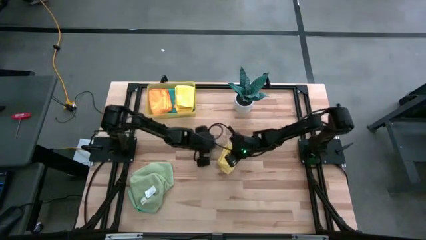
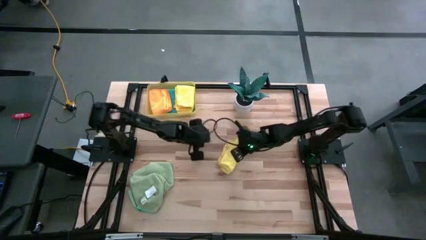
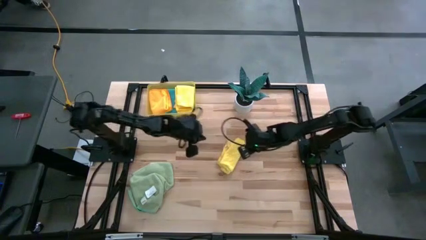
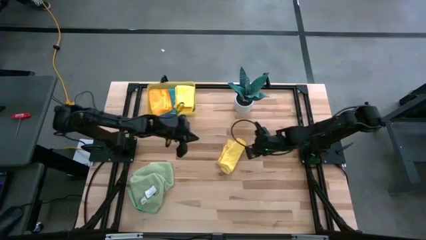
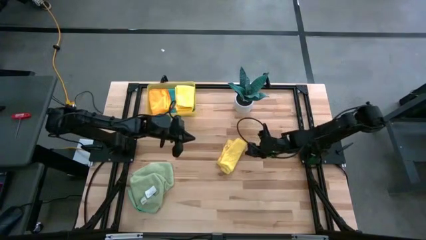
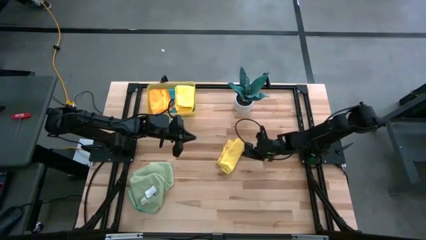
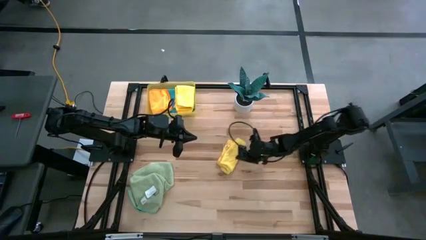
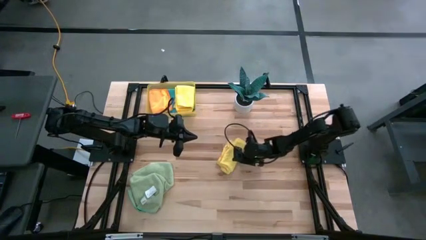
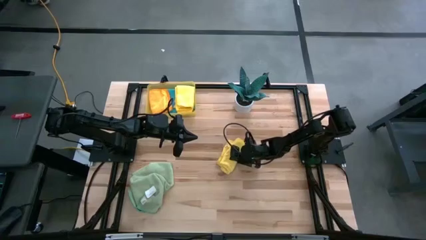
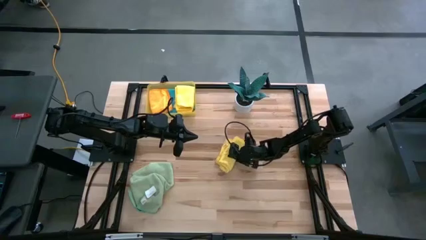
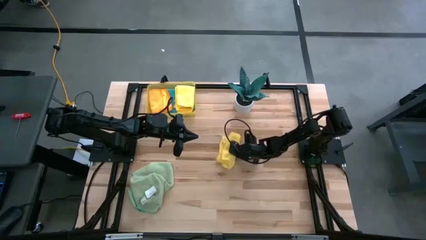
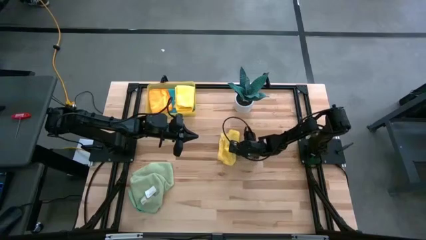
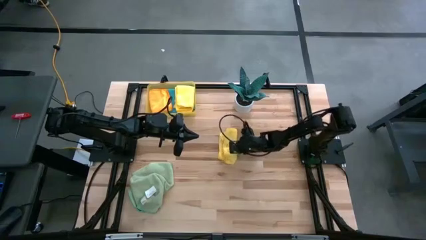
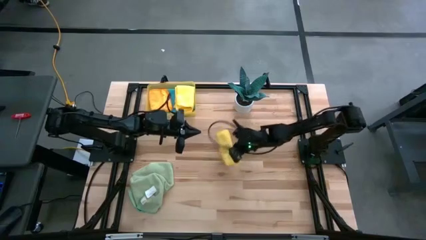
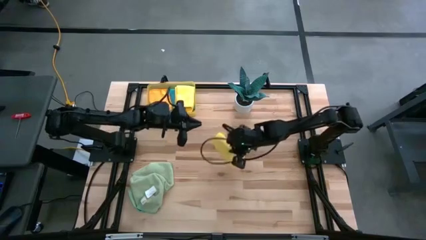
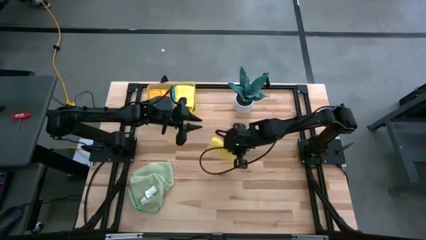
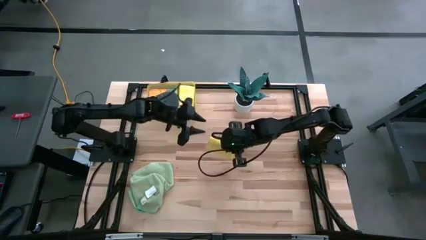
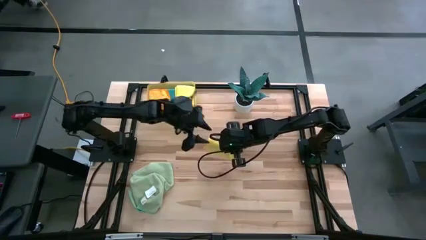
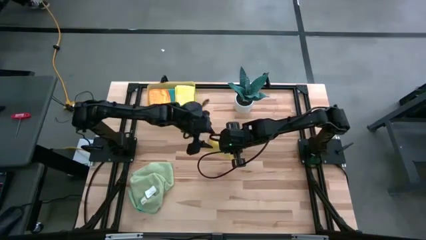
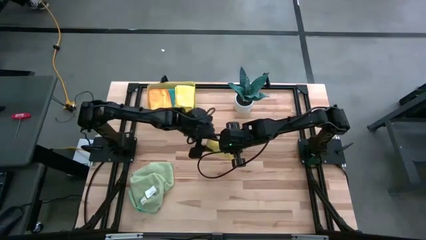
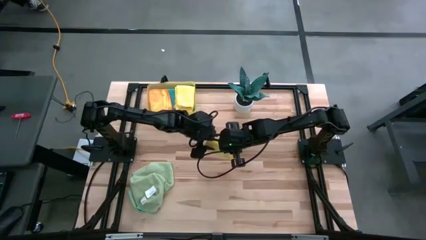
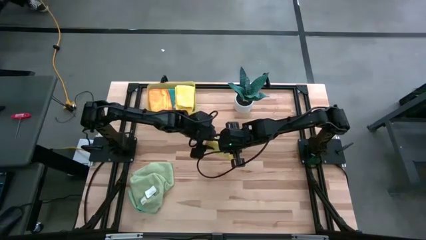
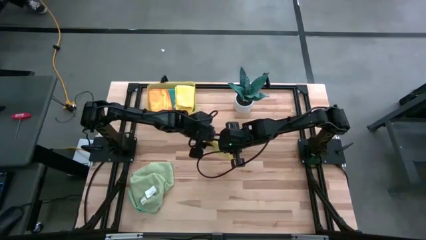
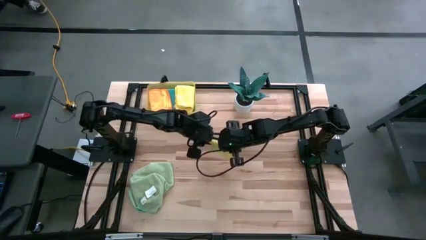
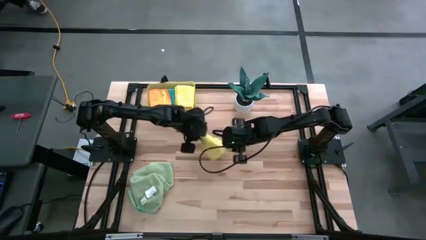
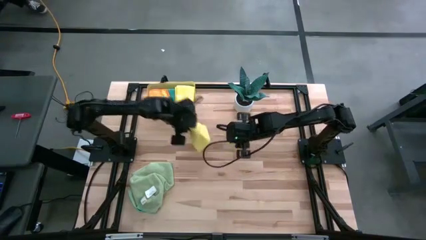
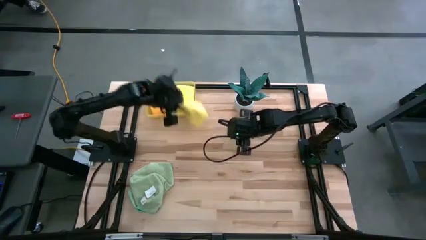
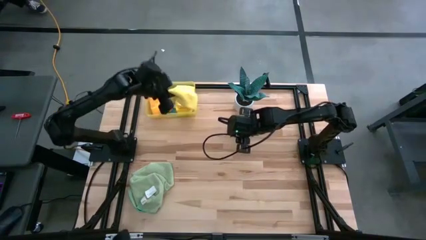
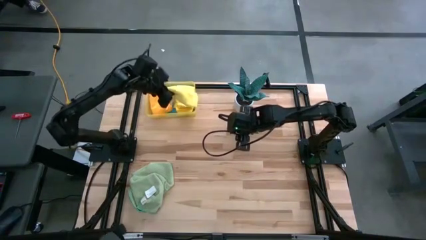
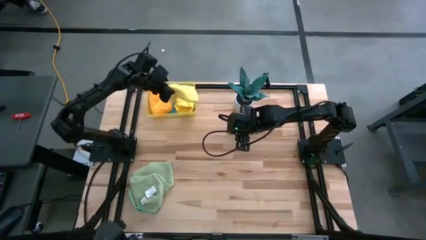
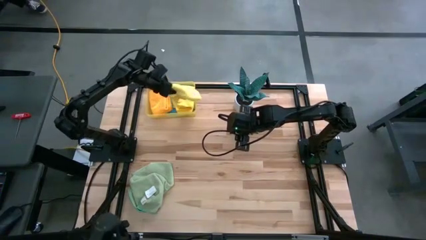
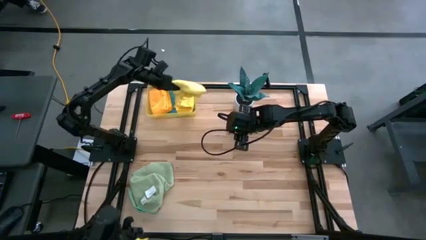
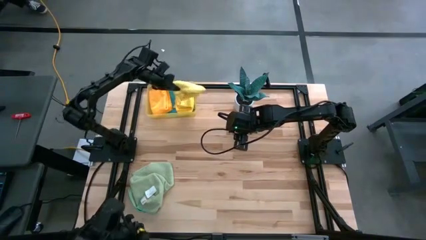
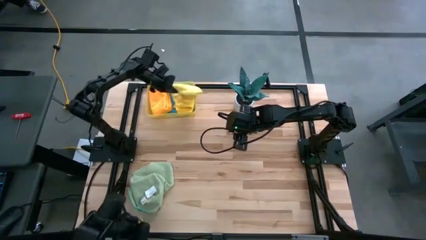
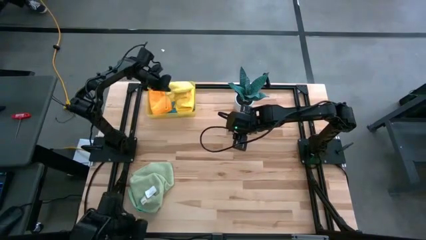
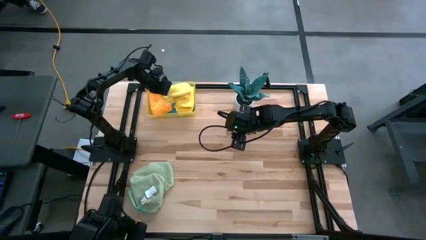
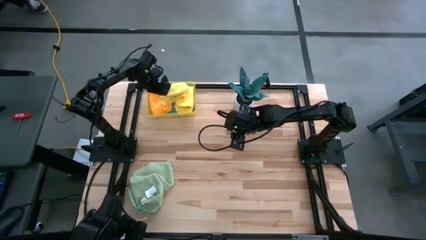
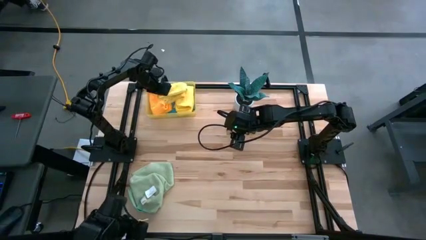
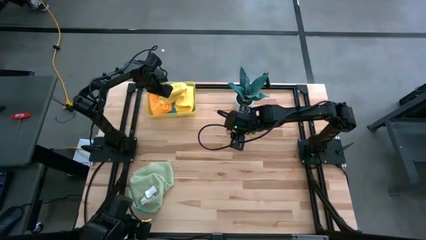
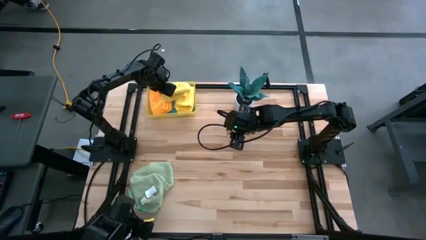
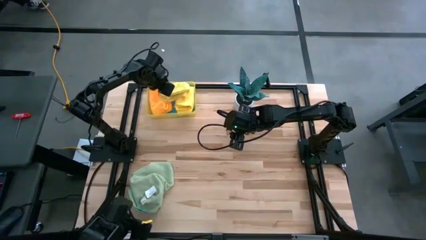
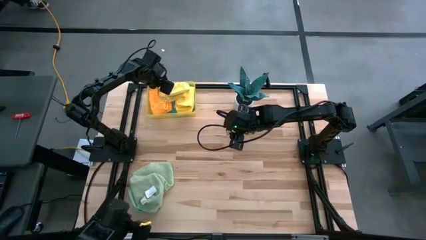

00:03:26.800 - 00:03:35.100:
Task: Fold microfiber towels
Put the folded yellow microfiber cloth into the bin

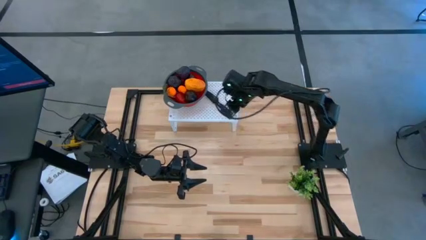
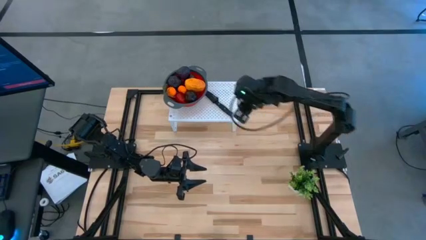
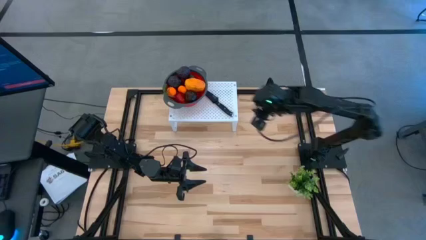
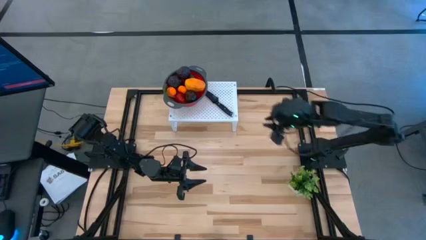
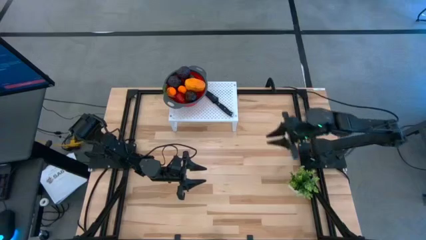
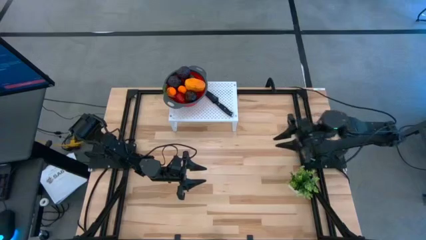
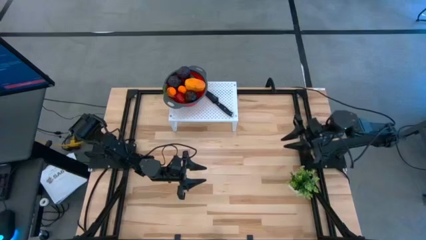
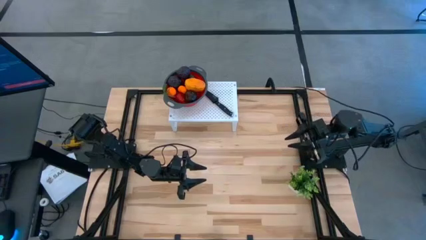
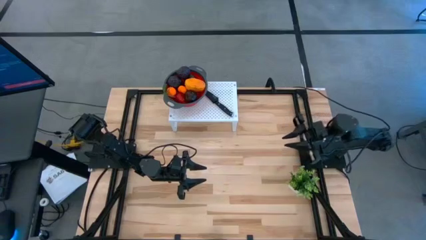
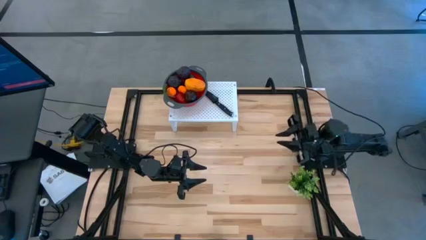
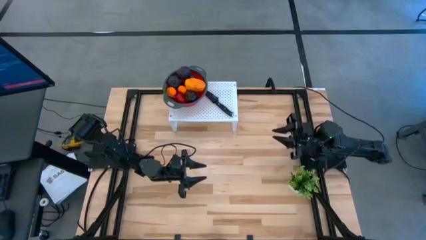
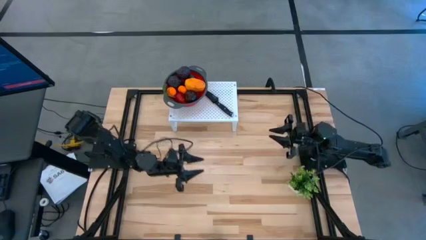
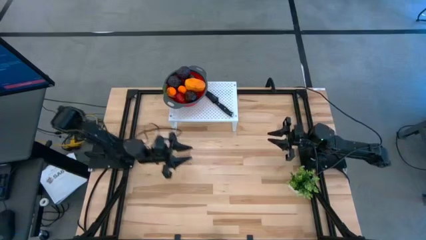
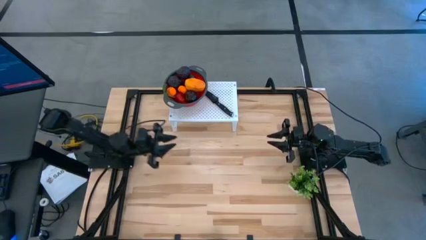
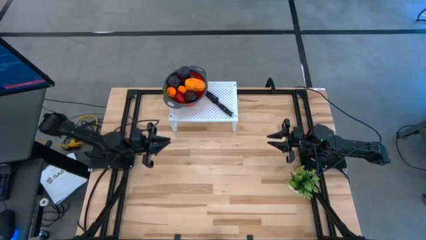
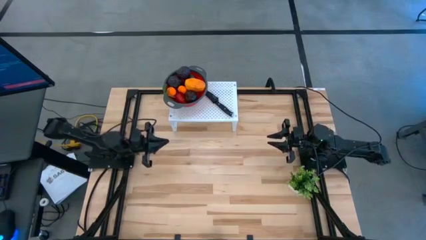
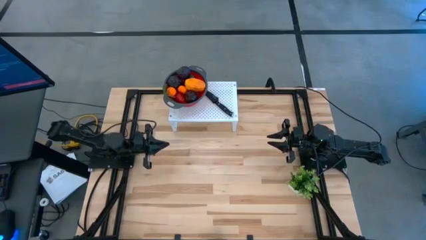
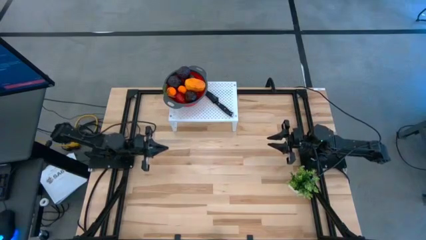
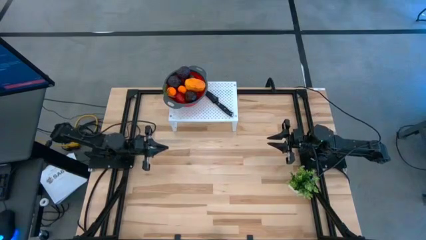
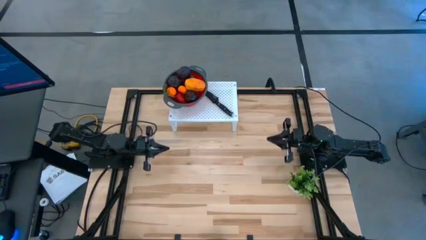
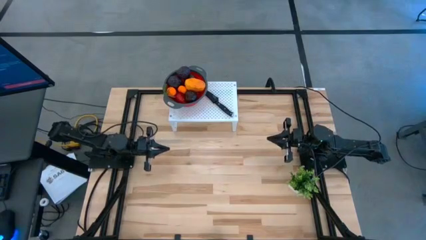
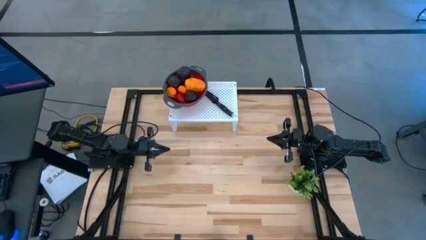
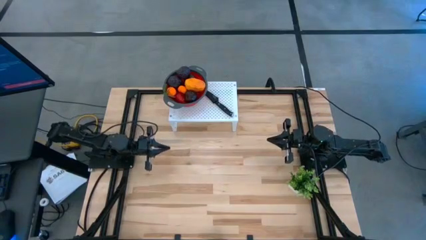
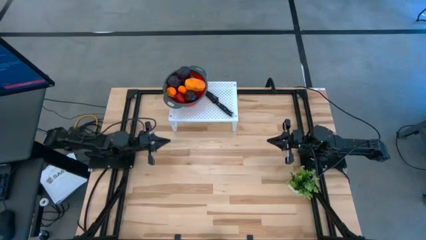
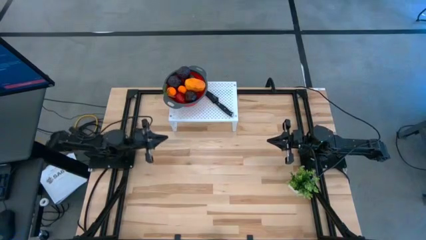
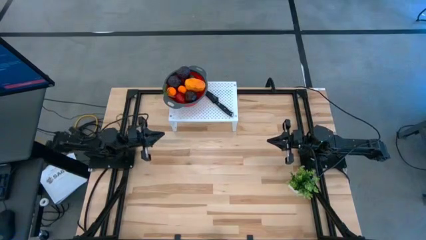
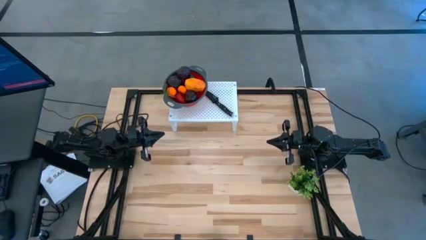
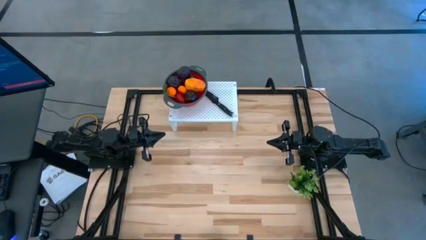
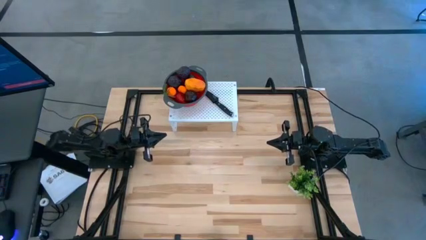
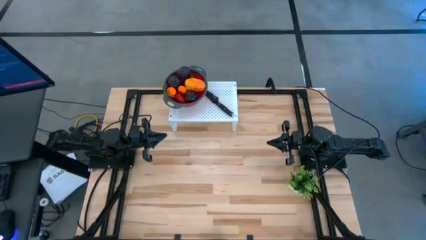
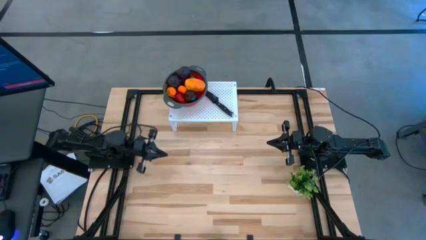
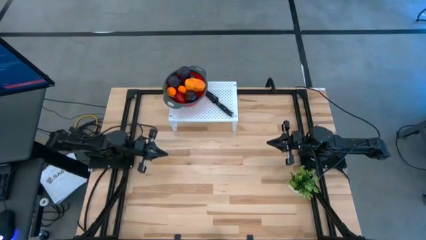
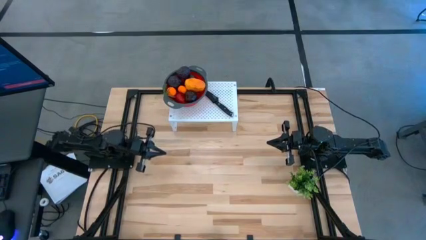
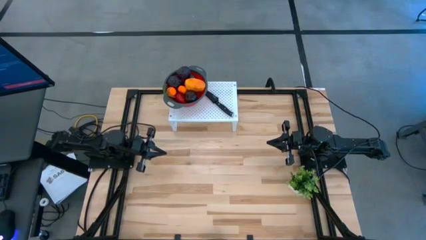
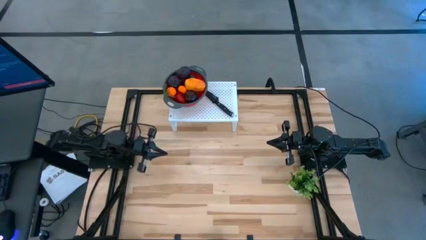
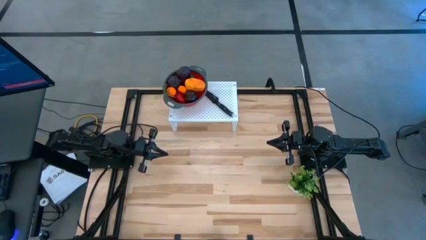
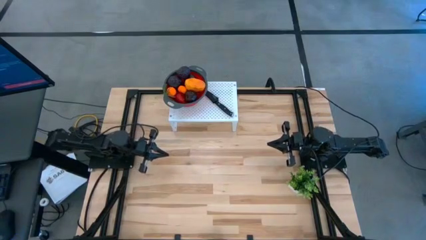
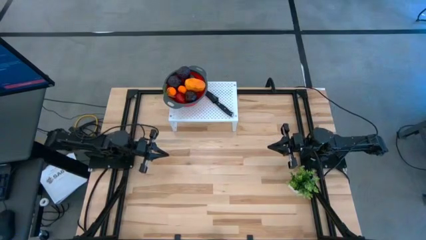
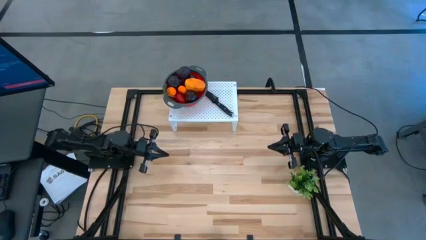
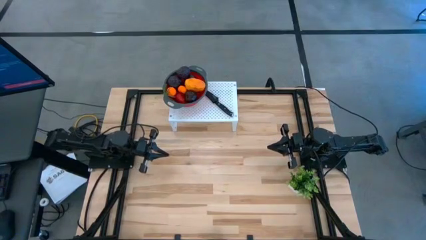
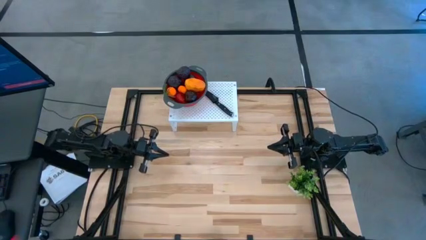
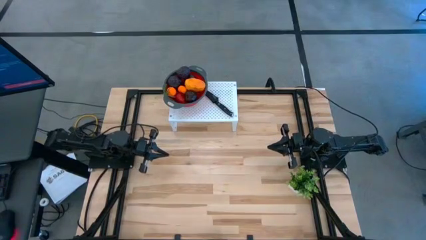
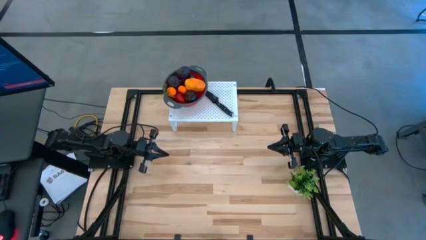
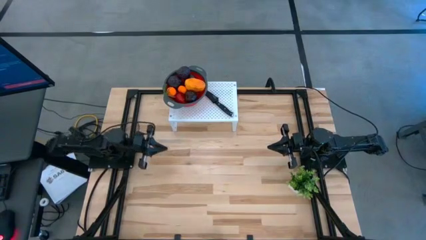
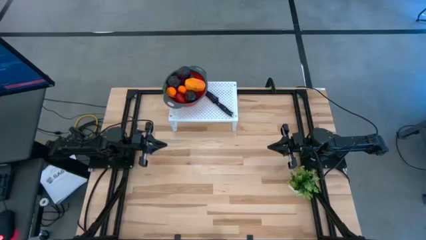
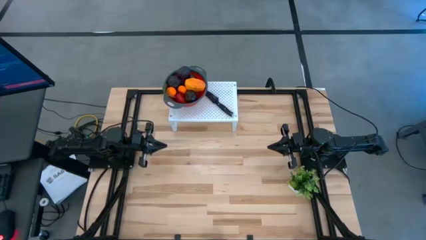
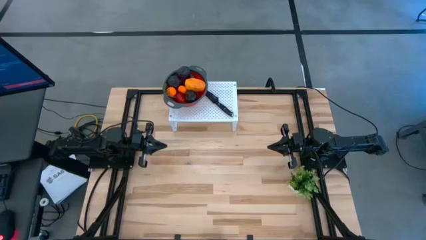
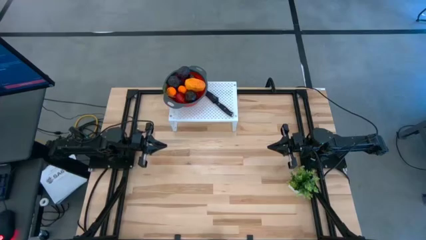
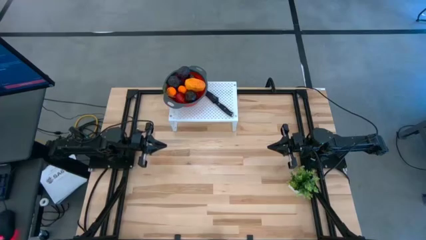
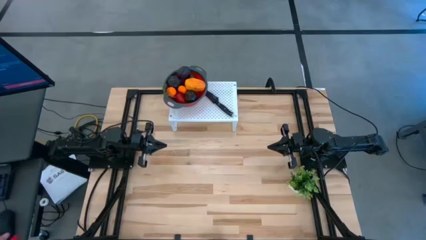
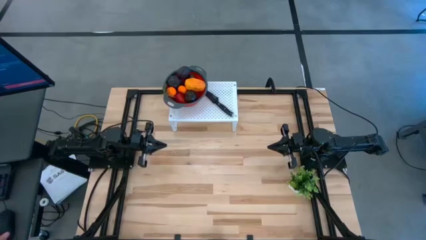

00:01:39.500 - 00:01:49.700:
Task: Pick & Place Fruit
Return to Home Position
